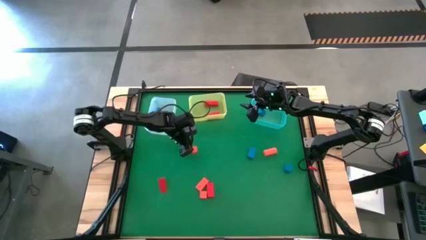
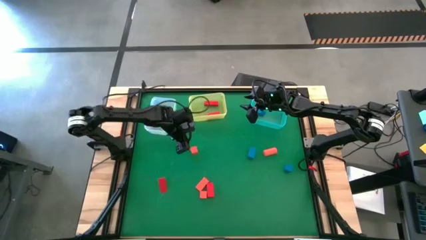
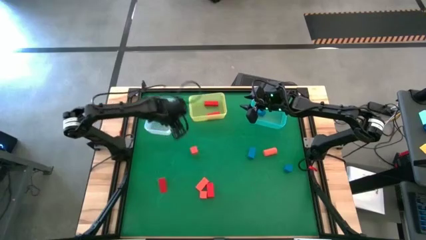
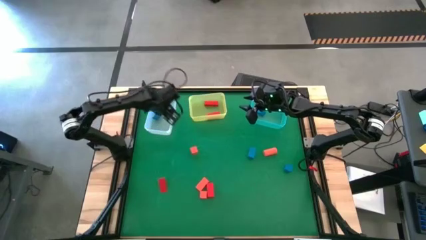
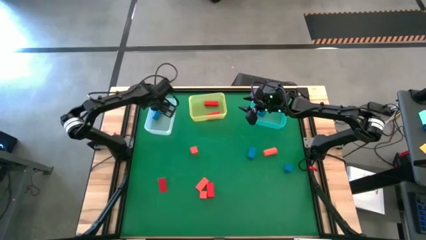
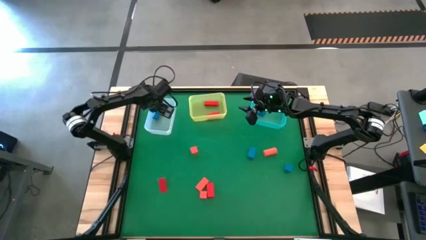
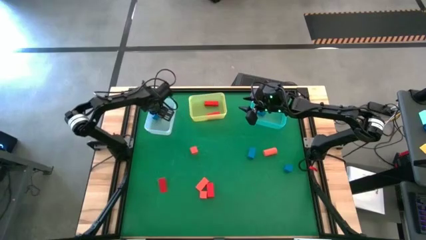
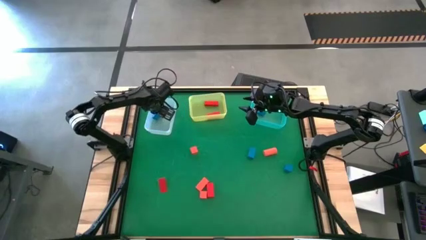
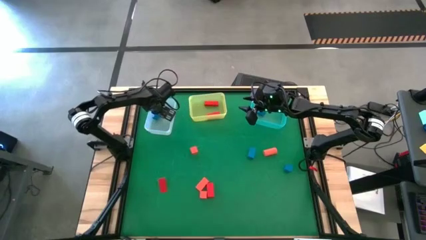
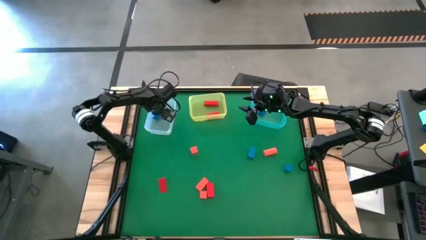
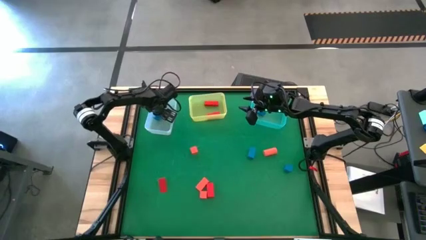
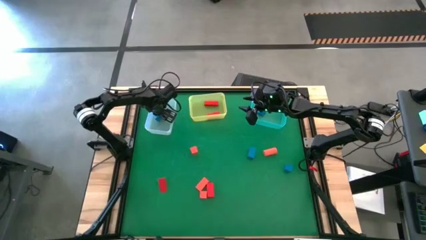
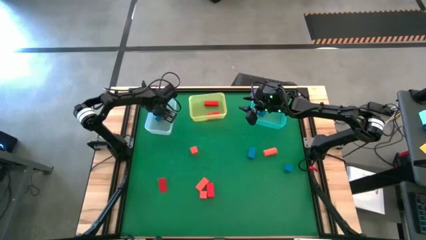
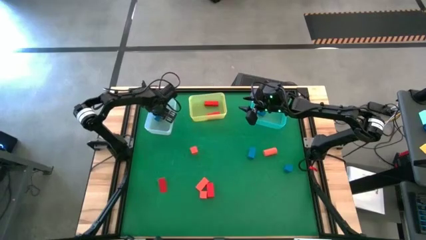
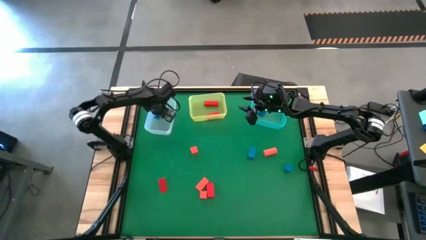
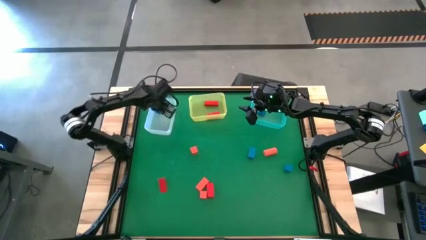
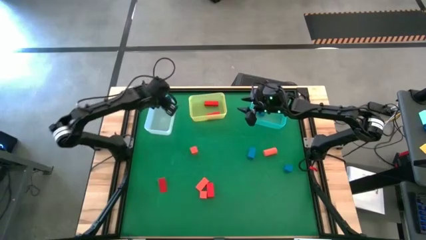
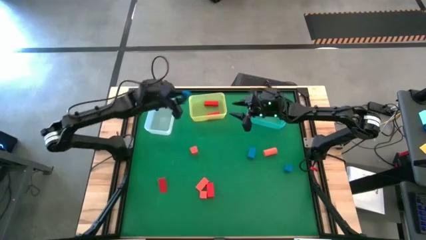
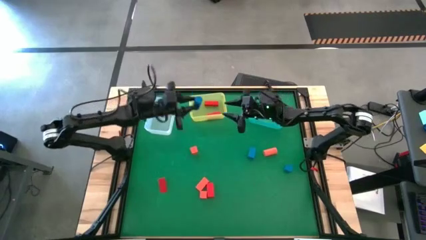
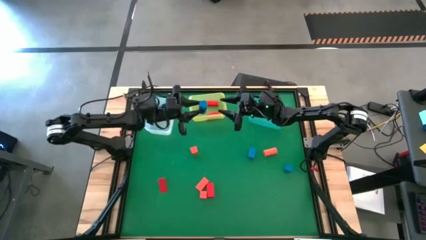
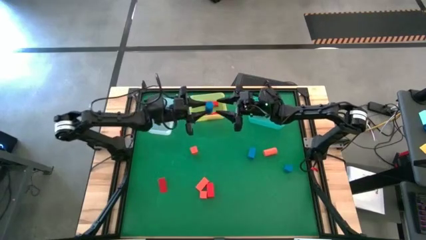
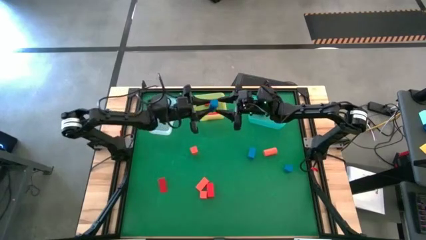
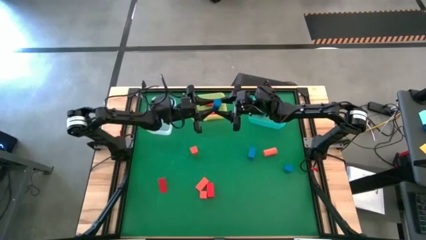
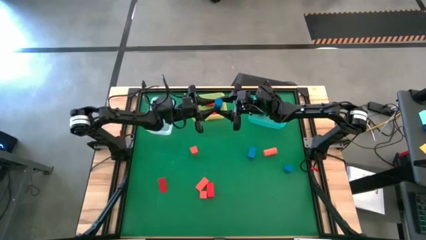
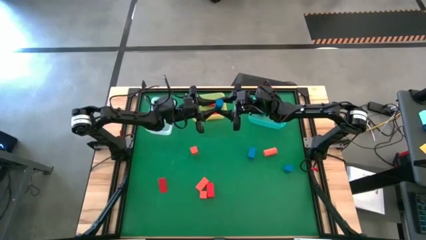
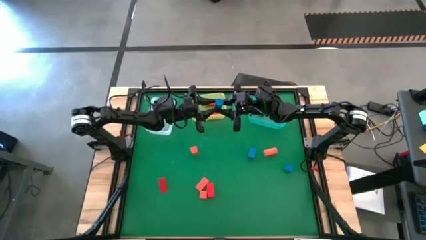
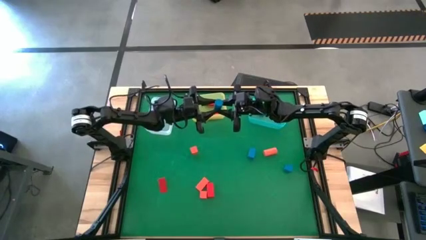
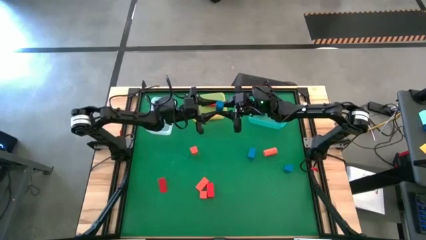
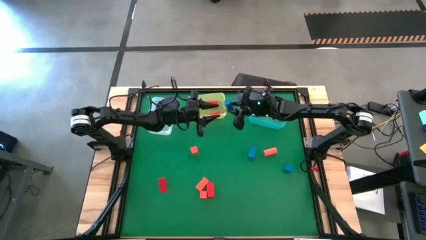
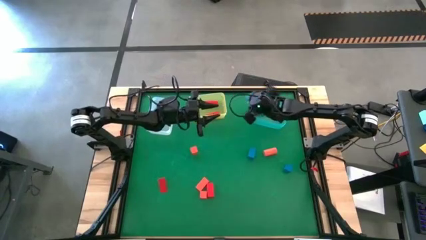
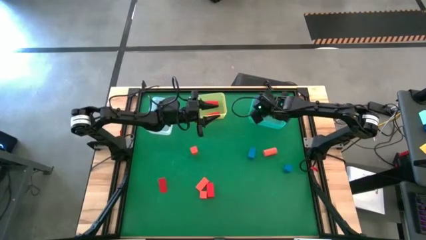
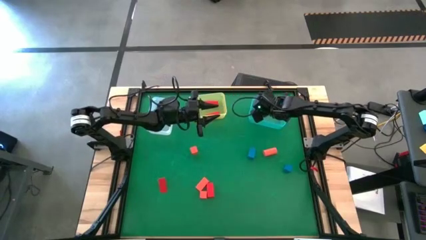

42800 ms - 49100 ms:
Task: Sort & place blocks by color
Put the blue block into the blue bin

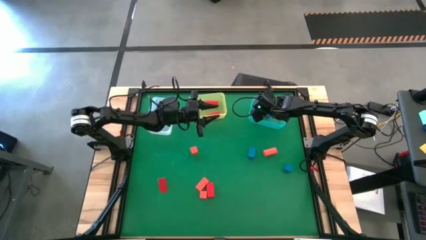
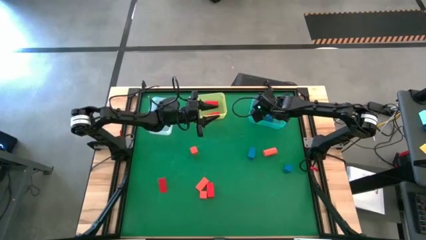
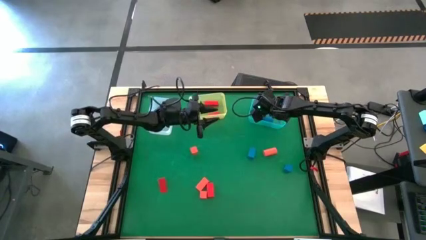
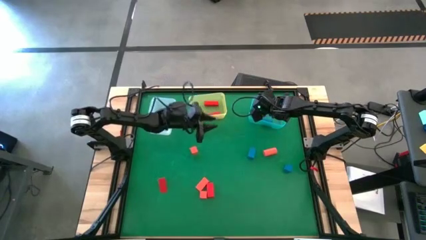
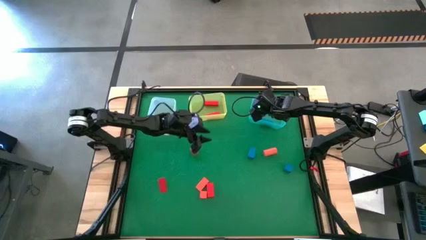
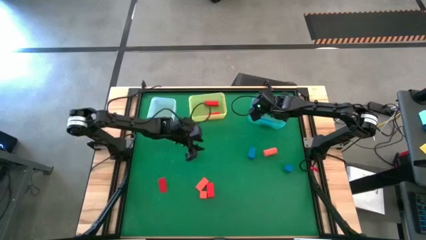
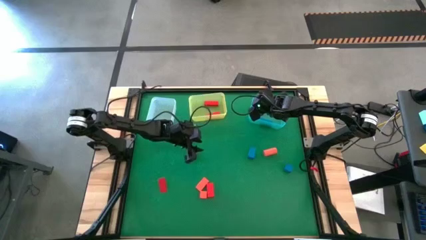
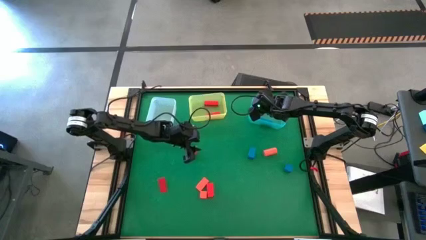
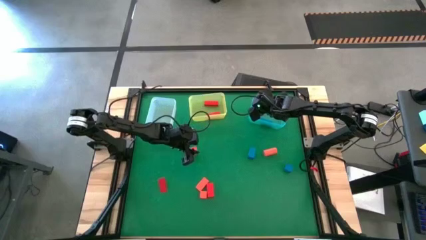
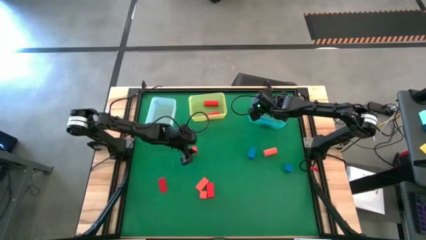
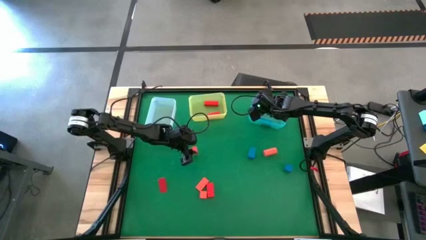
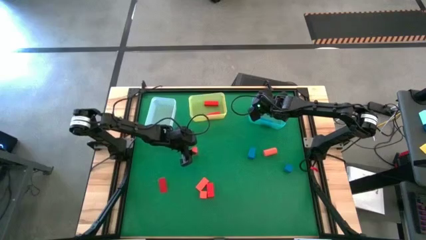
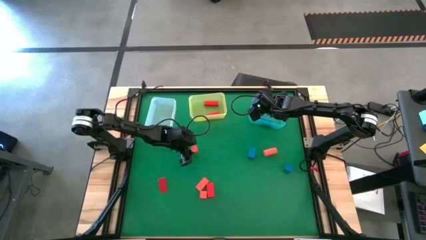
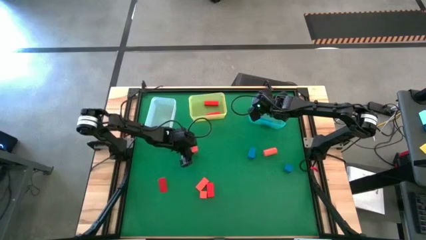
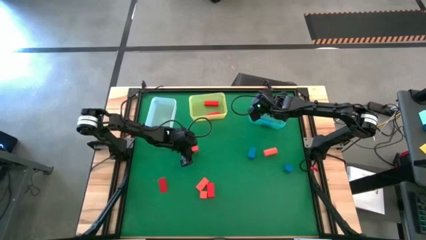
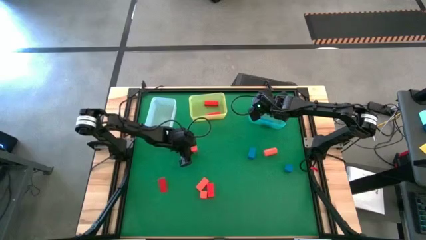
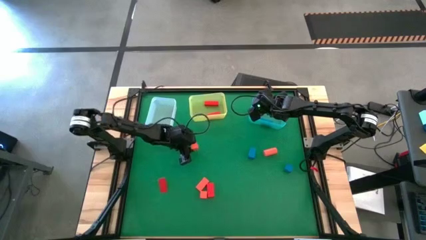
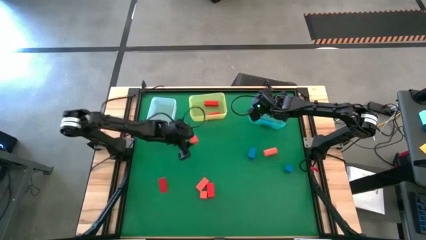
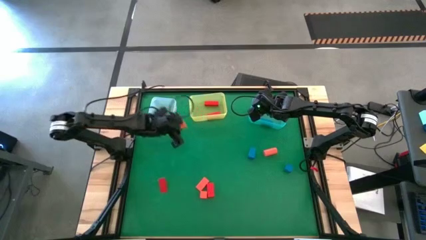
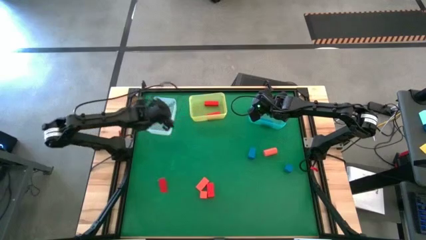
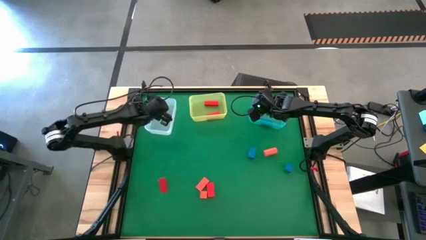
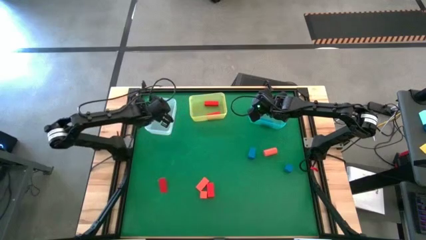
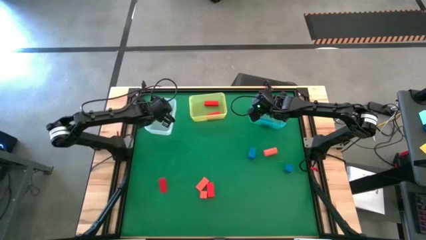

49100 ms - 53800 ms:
Put the orange block into the transparent bin

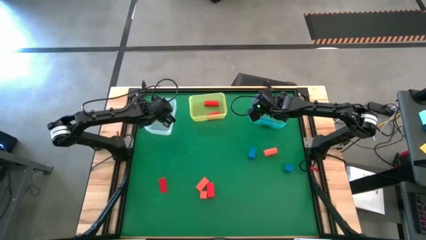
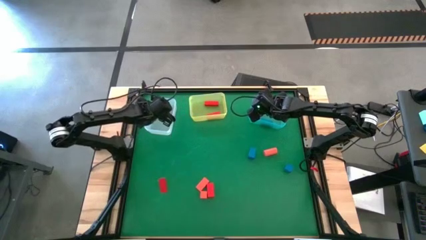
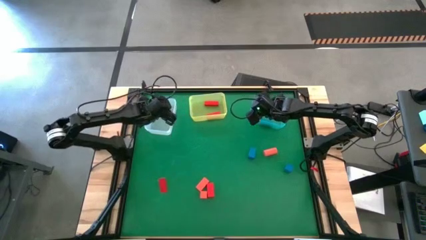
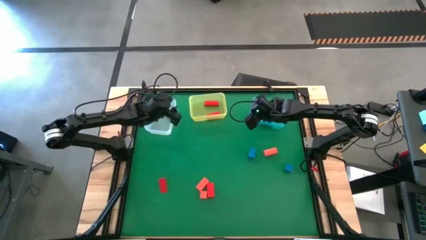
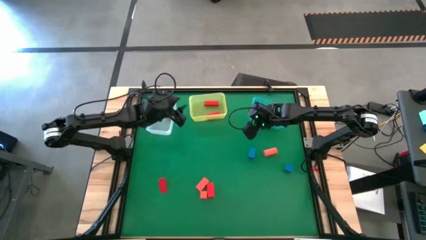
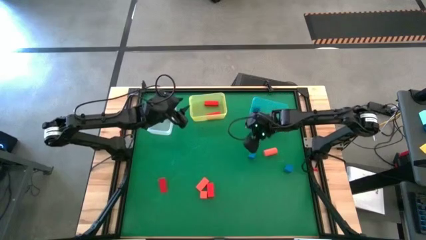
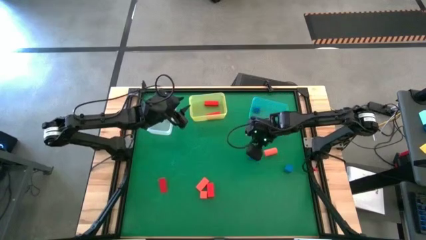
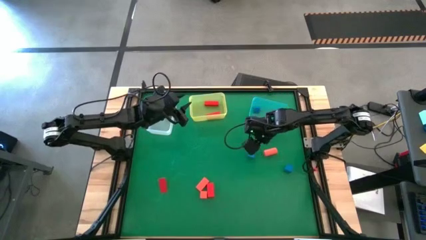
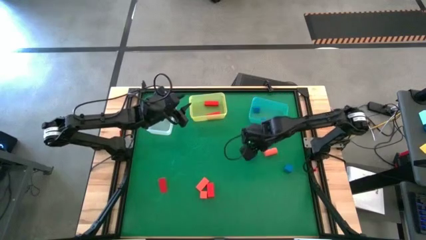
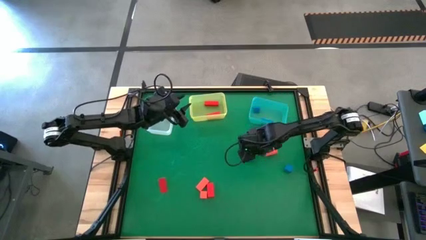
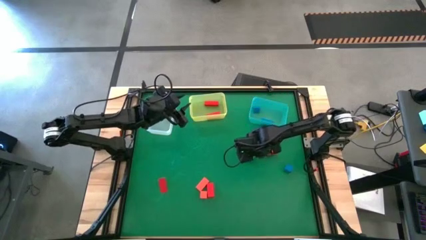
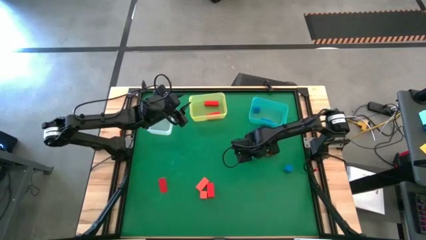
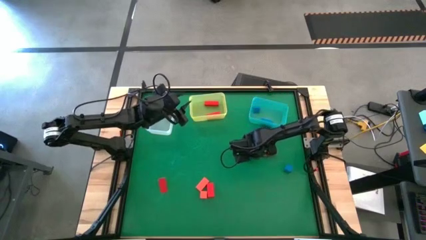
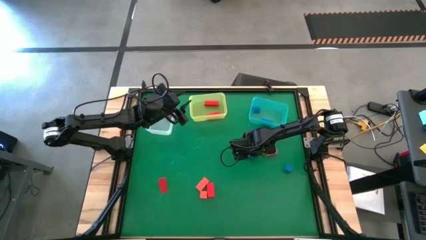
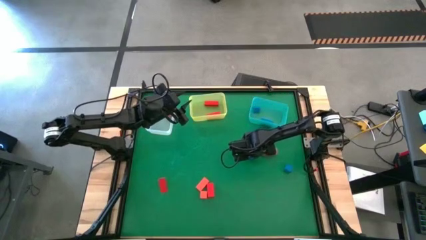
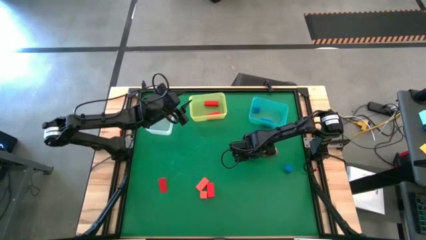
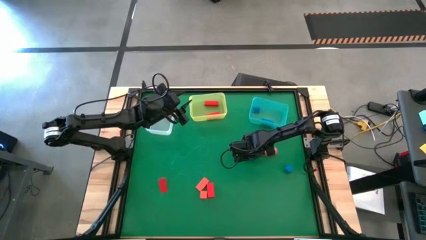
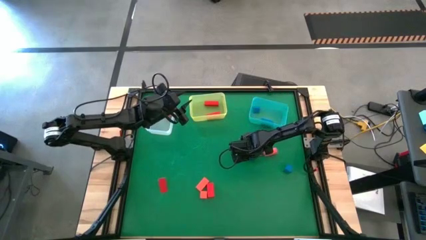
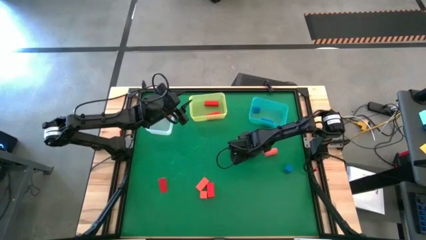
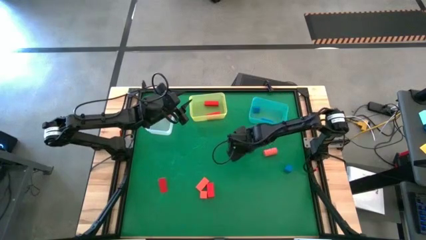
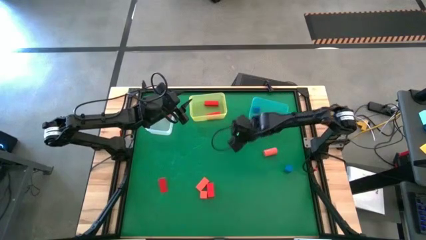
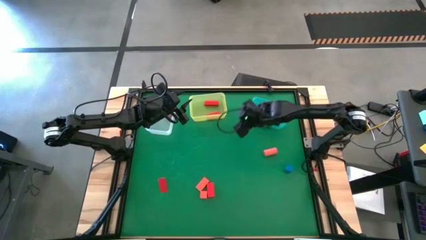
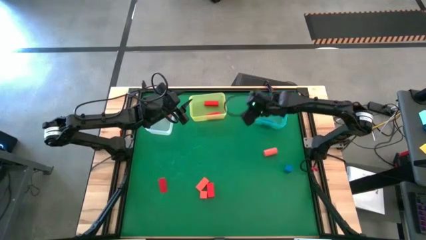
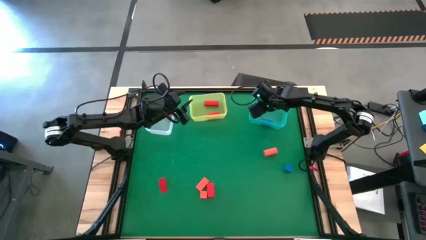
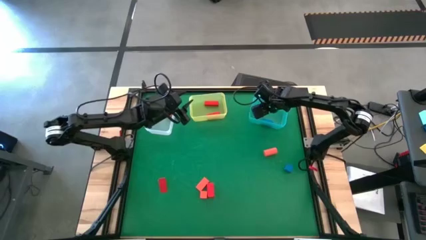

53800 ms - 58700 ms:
Put the blue block into the blue bin
